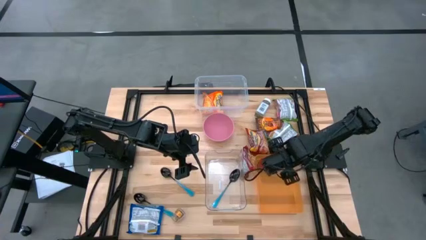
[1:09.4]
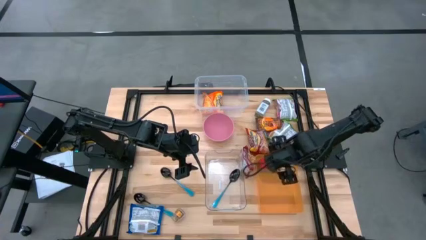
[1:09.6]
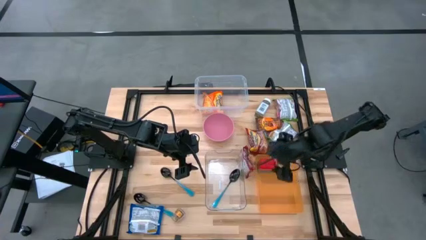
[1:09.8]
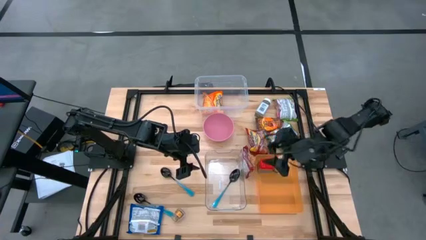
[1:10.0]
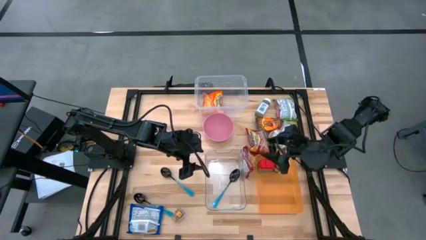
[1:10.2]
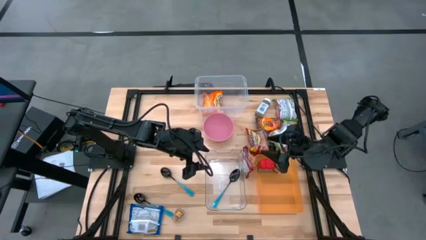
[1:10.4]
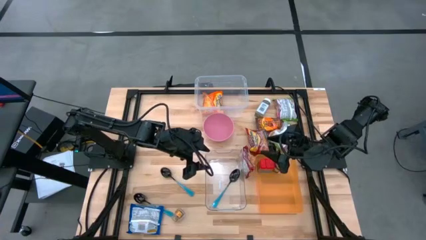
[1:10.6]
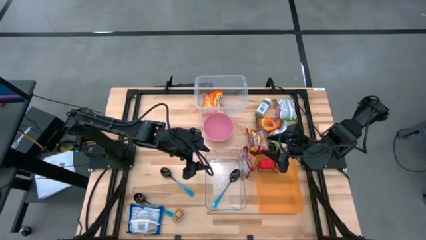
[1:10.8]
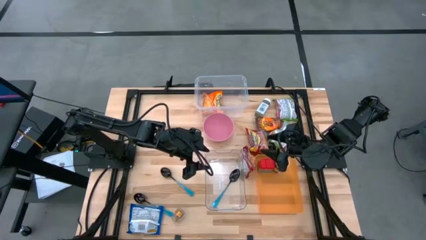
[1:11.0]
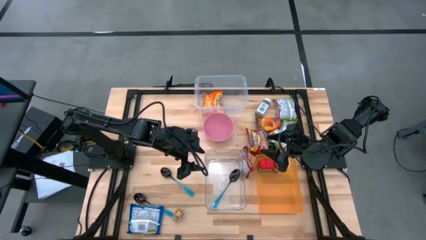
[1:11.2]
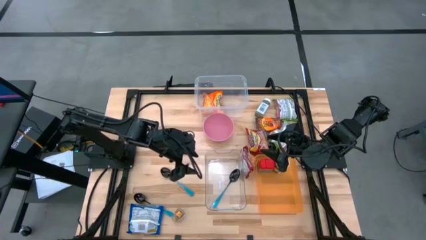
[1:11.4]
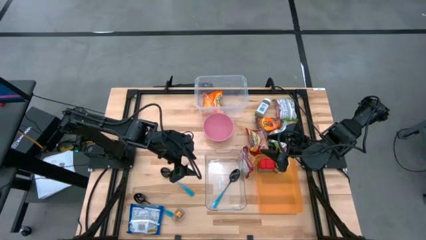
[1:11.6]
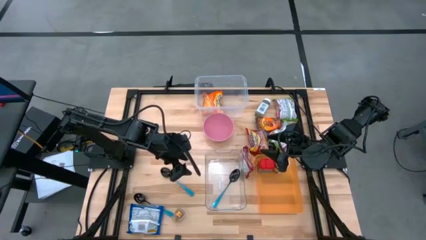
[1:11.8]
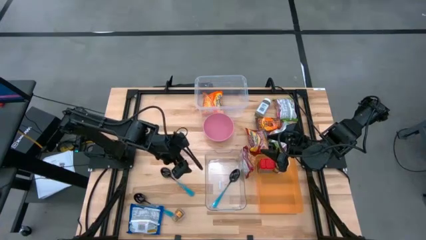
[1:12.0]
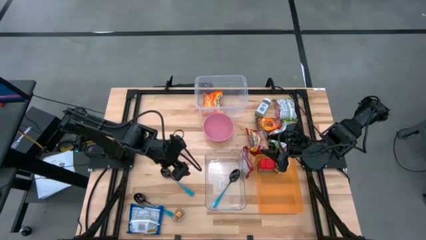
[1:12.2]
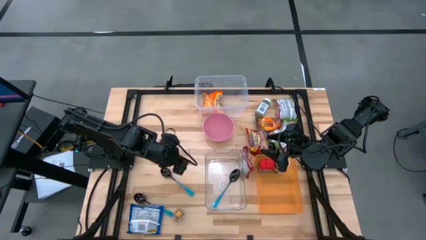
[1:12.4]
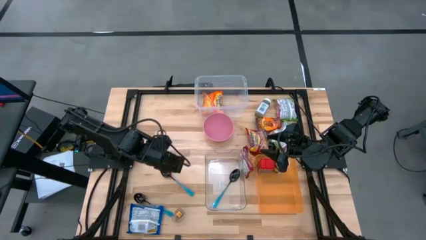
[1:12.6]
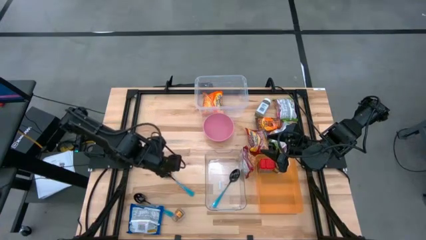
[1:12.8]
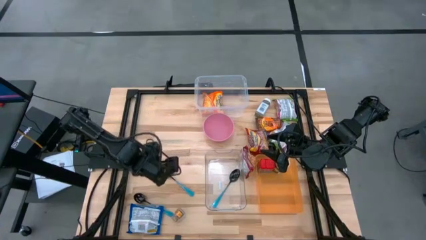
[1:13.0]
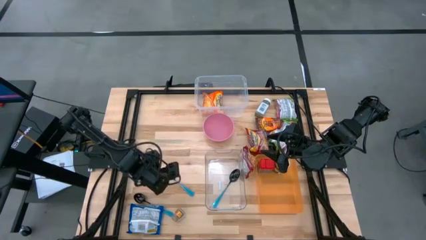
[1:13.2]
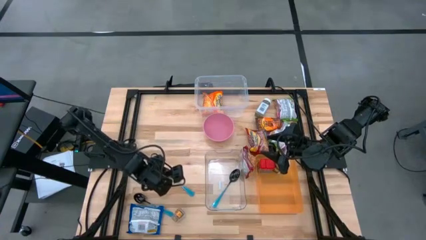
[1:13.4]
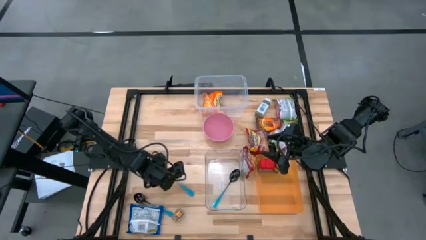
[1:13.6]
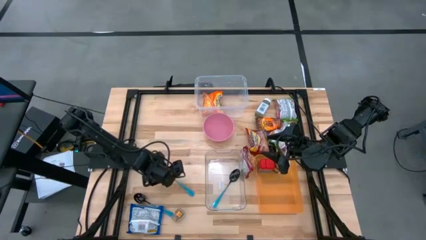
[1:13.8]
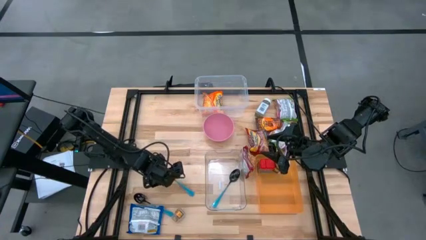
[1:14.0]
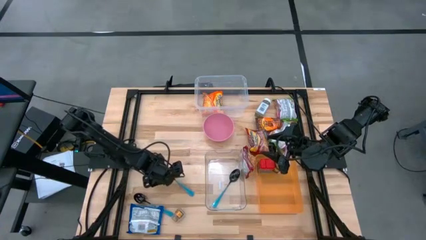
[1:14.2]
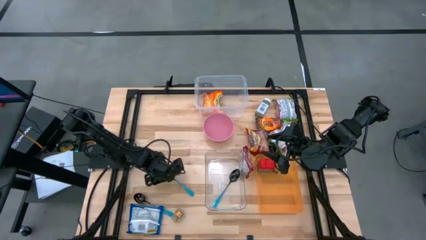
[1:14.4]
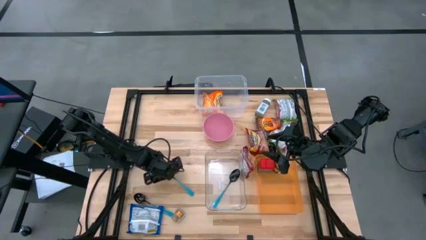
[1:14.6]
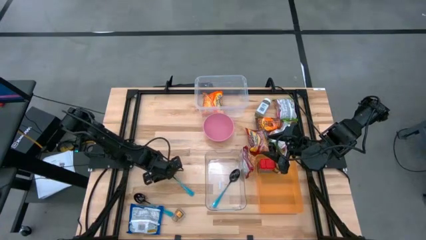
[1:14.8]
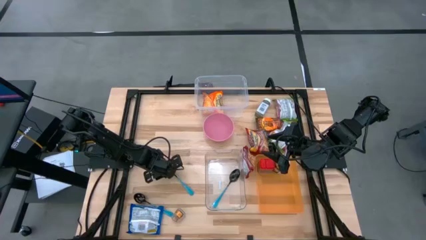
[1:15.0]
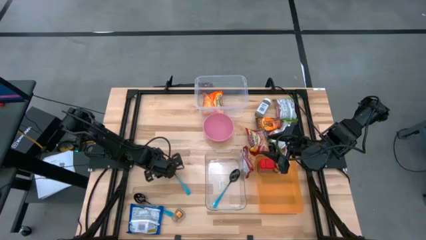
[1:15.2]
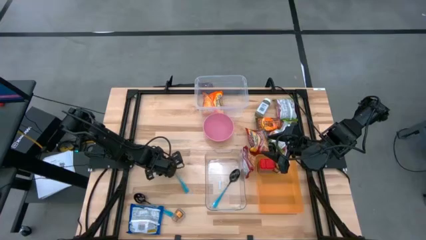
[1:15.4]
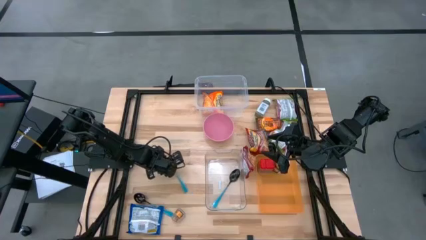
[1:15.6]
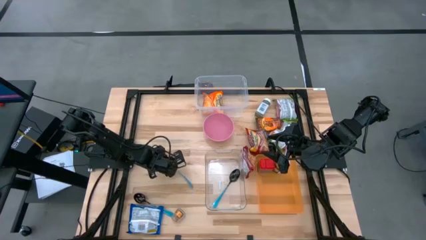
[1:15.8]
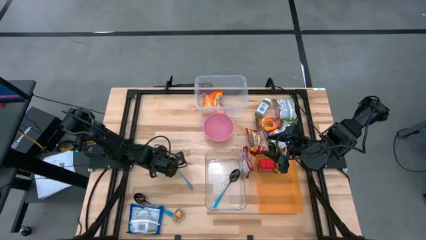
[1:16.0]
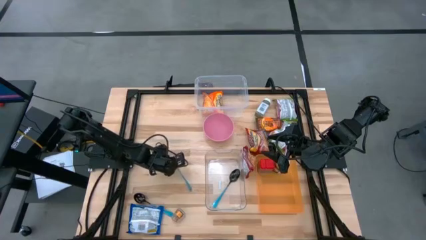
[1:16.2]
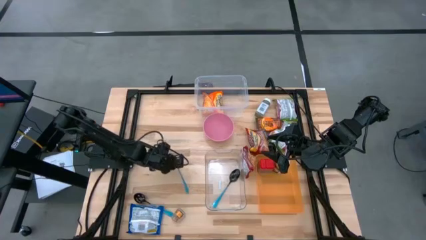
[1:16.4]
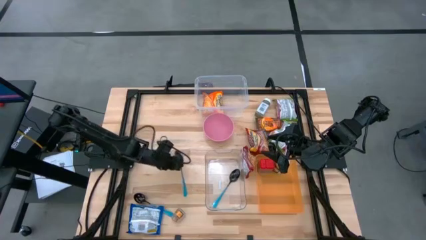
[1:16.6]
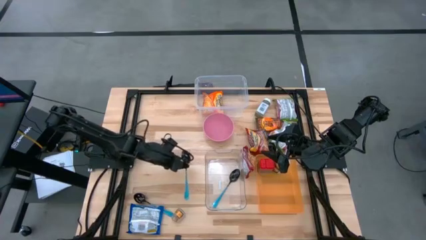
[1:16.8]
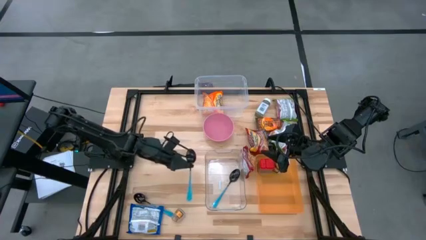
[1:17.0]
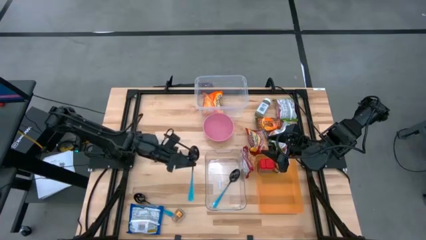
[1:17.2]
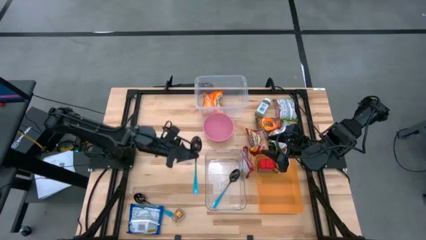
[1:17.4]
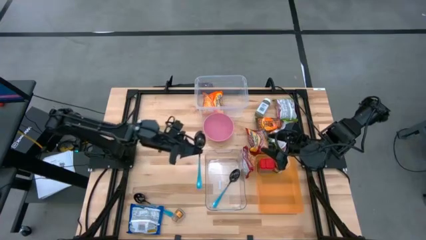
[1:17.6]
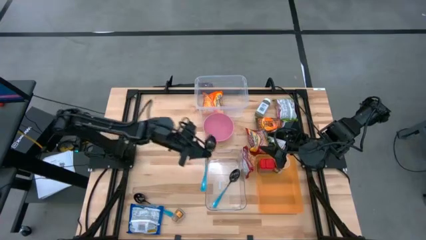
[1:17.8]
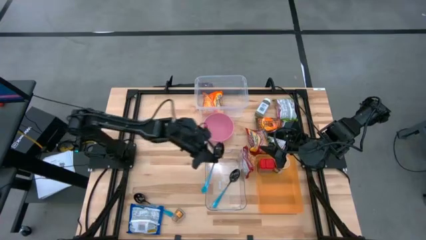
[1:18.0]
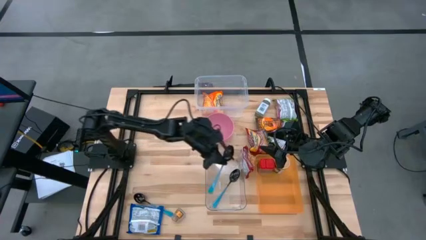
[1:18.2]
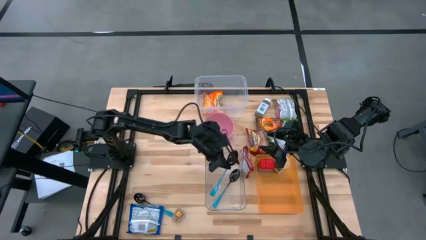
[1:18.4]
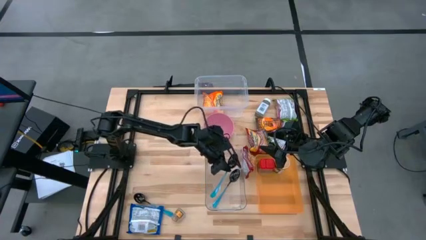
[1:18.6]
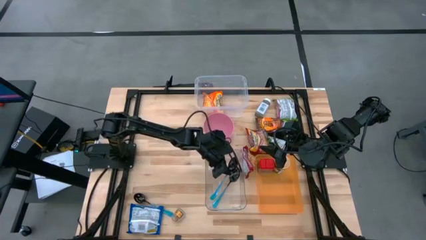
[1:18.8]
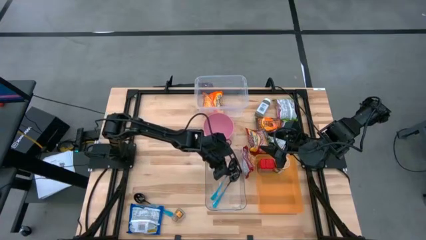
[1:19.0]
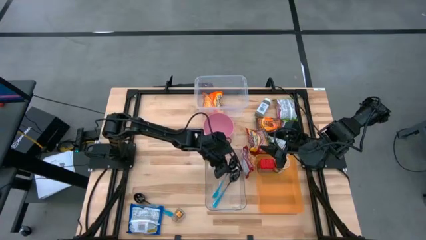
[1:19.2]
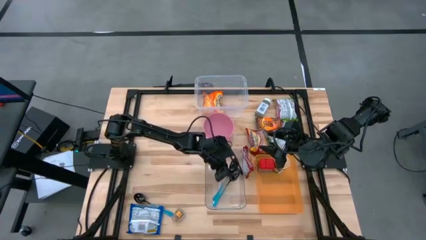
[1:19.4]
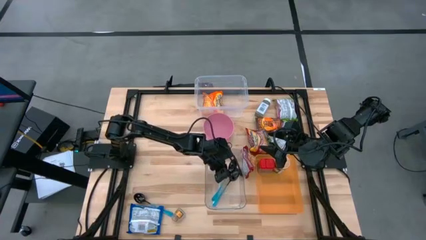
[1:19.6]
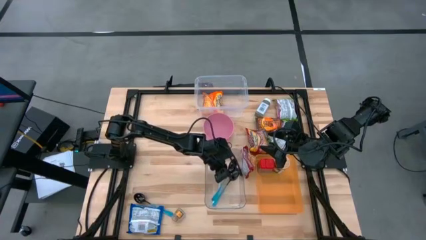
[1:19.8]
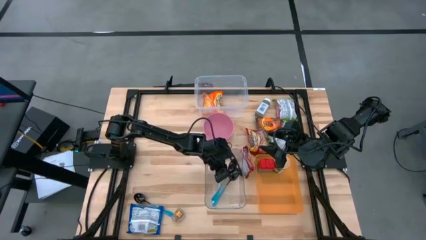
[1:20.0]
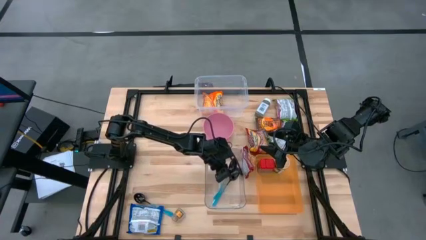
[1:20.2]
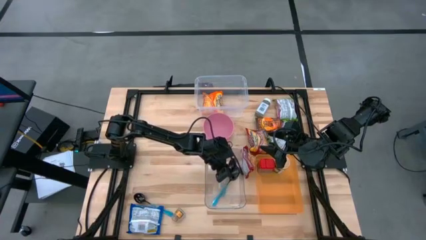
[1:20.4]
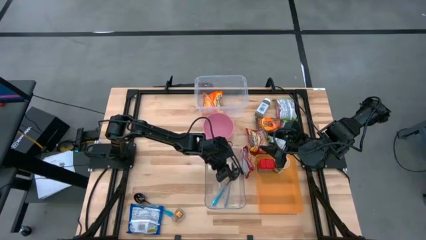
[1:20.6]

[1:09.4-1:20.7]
Task: Pick & Place Food Item
Put the blue spoon into the bottom transparent bin

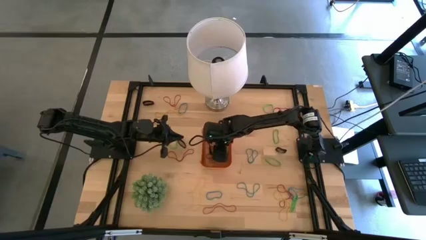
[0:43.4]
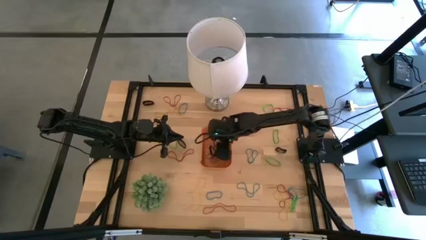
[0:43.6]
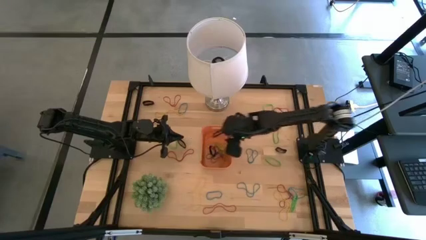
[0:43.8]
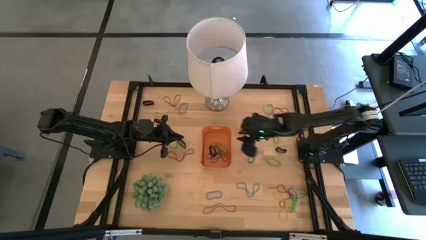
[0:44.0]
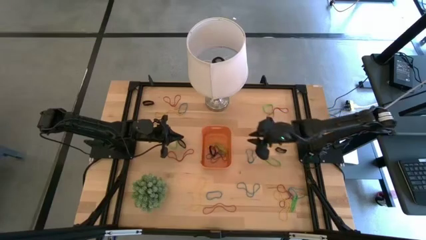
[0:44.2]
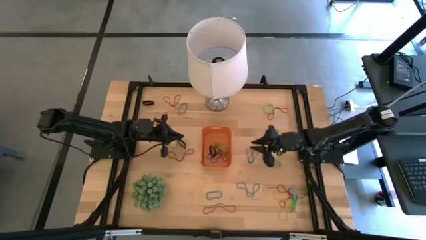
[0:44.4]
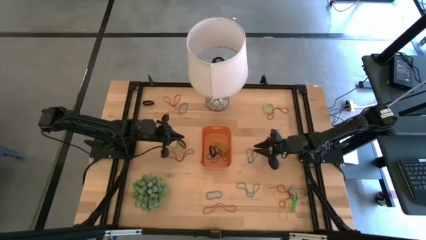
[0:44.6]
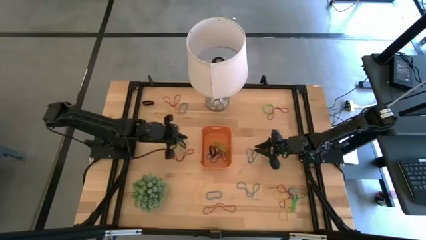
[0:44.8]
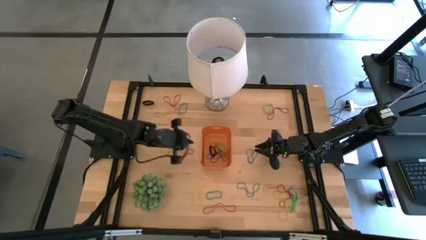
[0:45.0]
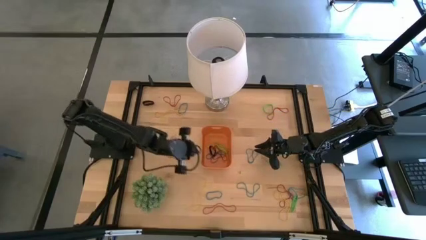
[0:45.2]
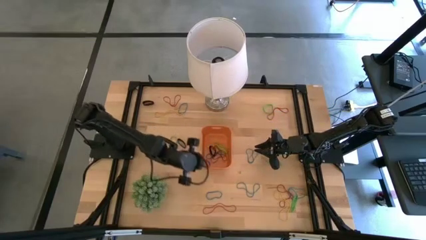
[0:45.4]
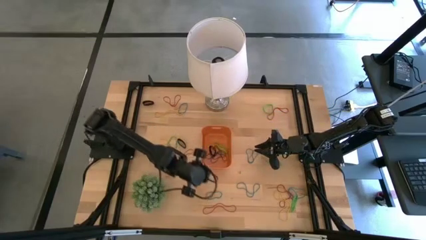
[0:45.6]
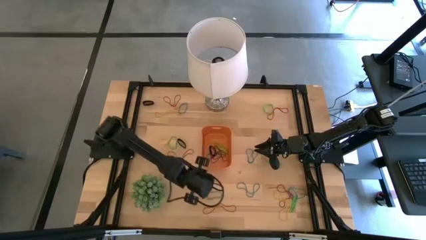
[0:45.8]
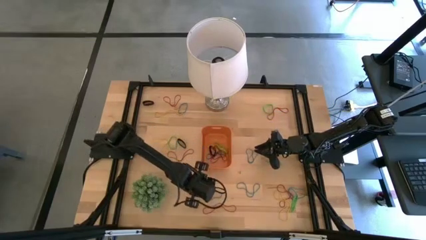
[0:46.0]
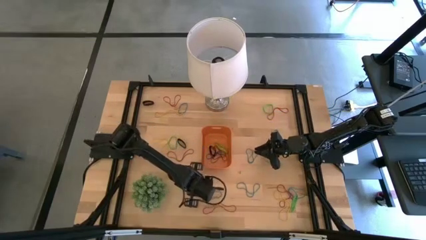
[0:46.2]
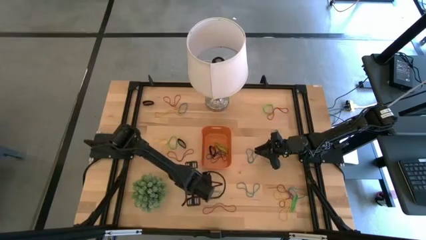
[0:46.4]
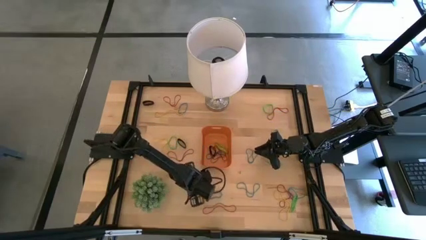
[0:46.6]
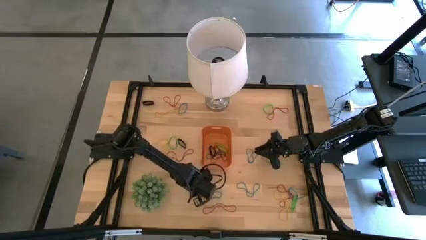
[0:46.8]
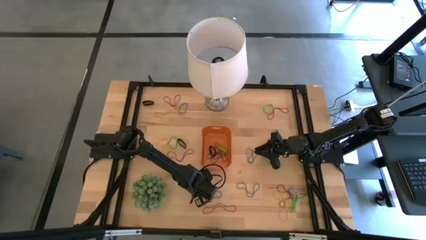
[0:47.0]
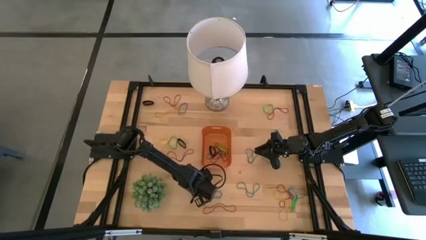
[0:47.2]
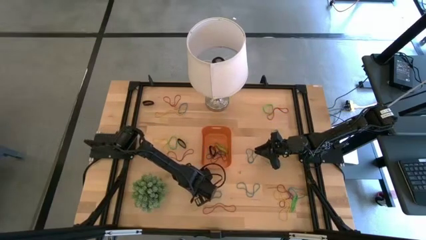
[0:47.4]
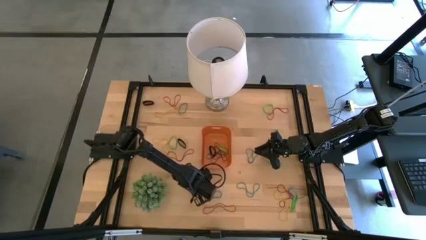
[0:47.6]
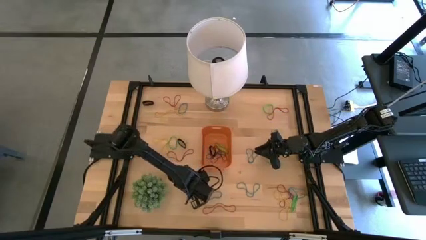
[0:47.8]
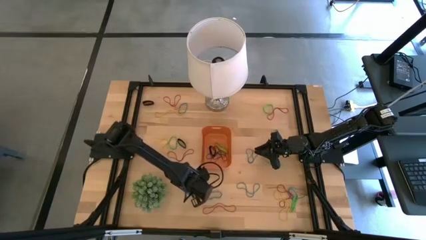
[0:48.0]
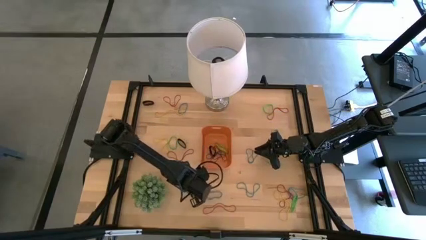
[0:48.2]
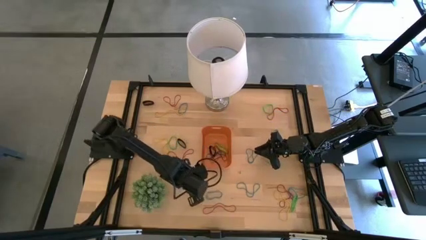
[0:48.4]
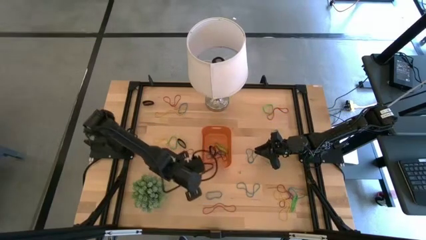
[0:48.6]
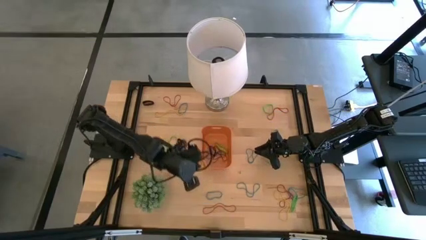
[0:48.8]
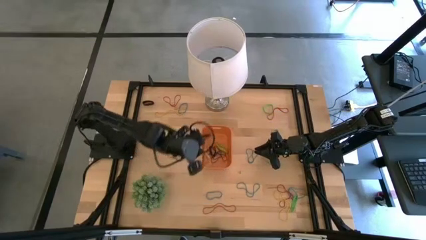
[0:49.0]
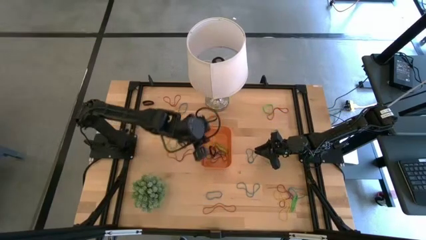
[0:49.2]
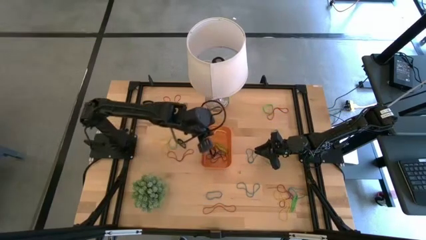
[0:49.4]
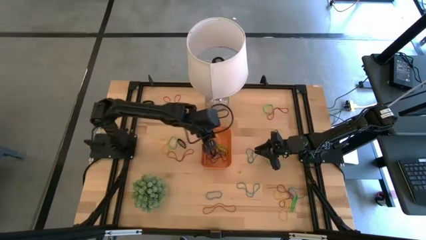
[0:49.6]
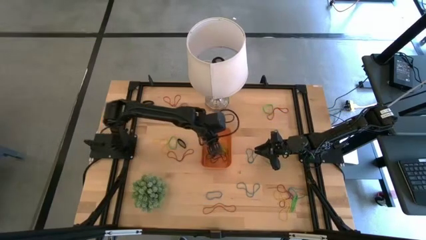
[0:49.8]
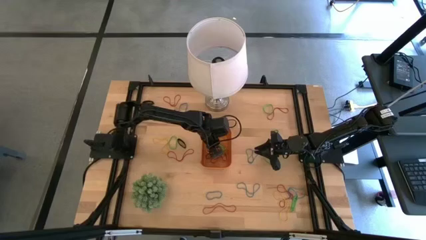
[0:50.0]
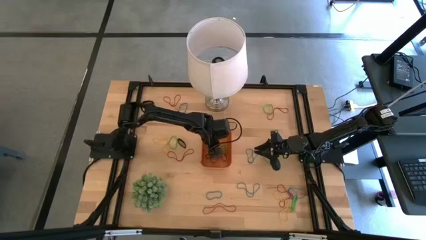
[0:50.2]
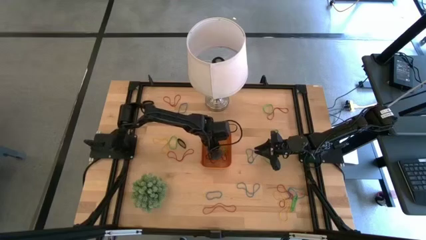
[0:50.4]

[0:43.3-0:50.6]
Task: Pick and place rubber bands into bin
Put the yellow rubber band into the orange bin
